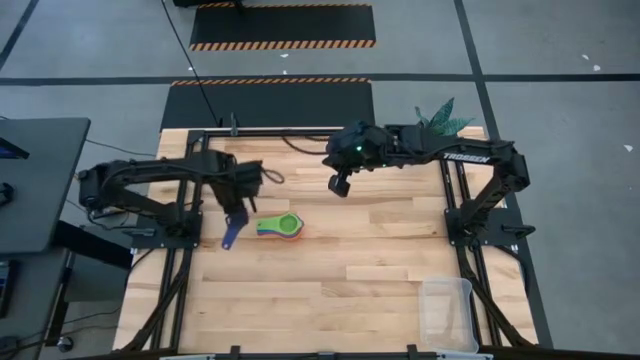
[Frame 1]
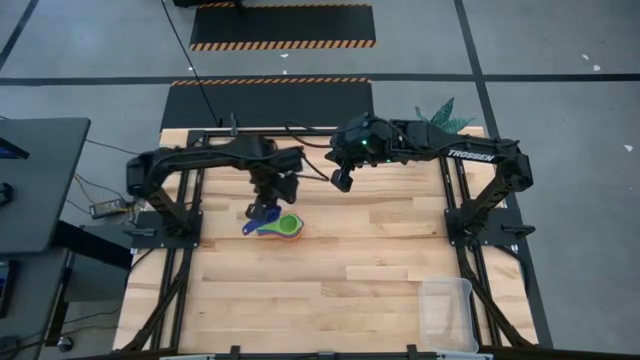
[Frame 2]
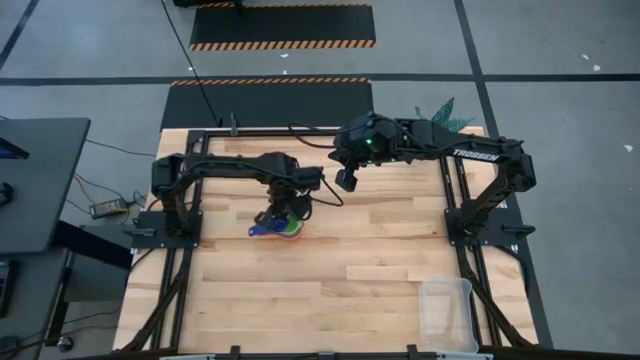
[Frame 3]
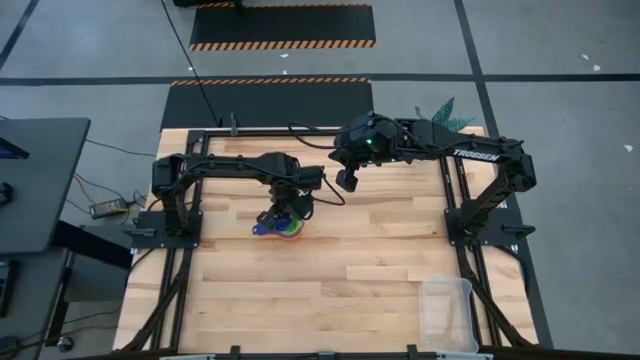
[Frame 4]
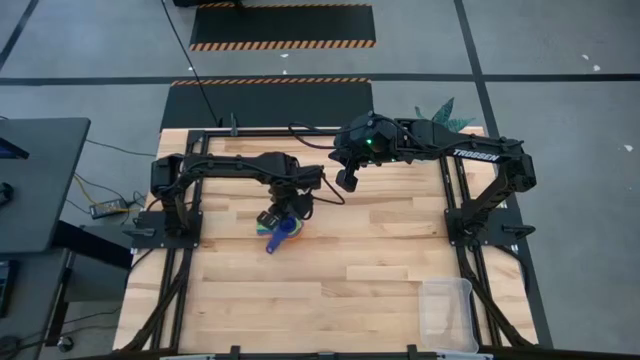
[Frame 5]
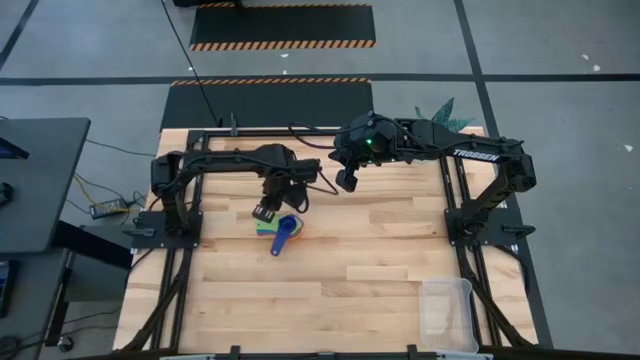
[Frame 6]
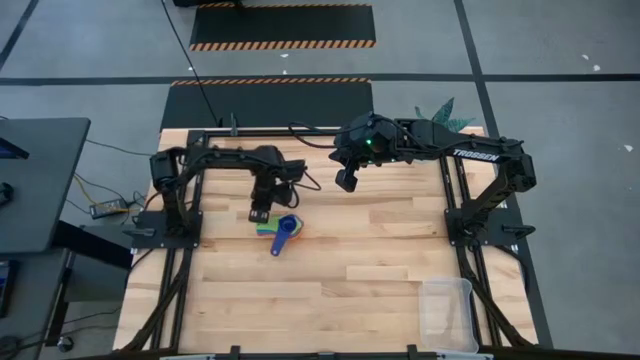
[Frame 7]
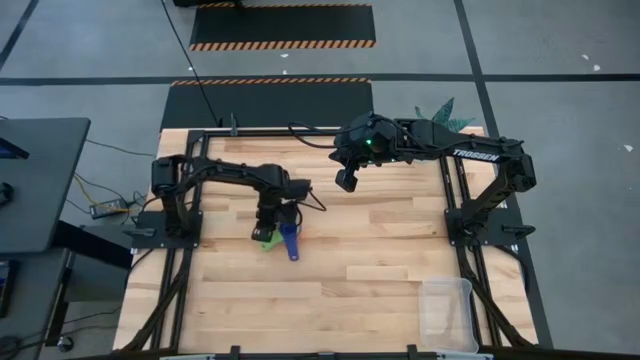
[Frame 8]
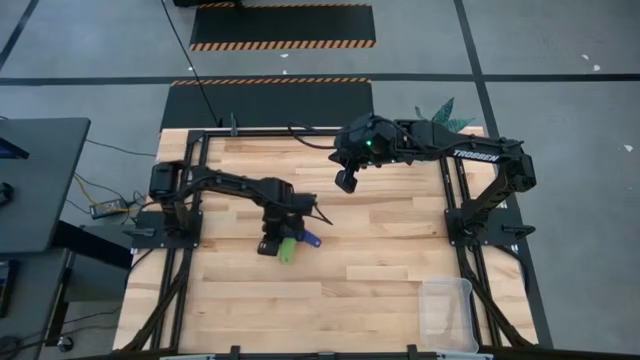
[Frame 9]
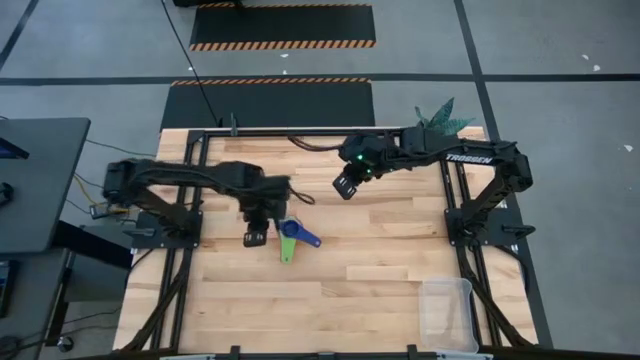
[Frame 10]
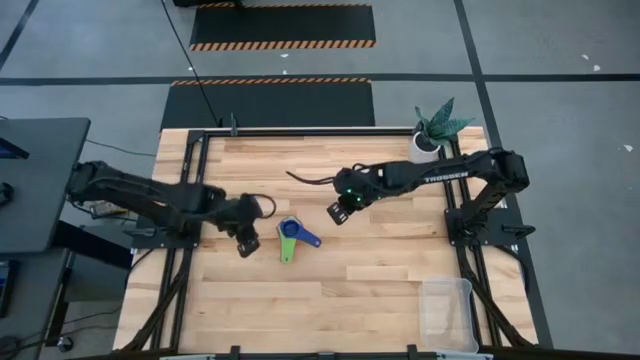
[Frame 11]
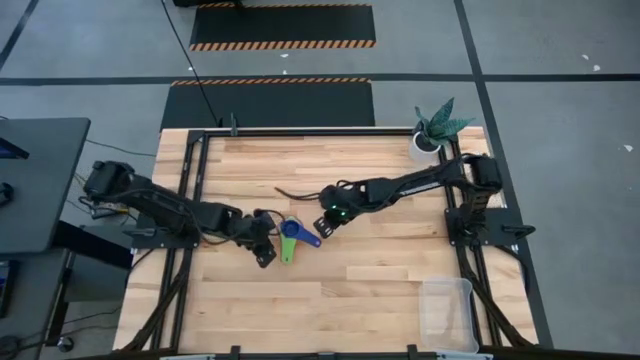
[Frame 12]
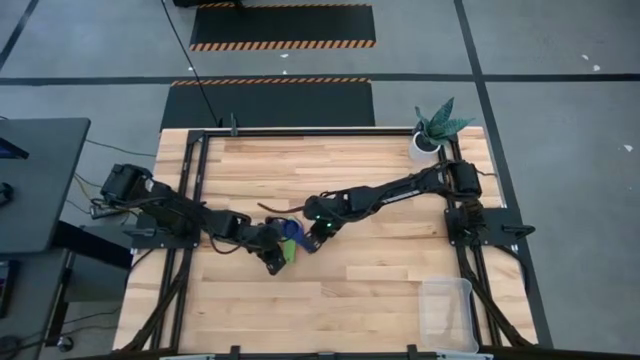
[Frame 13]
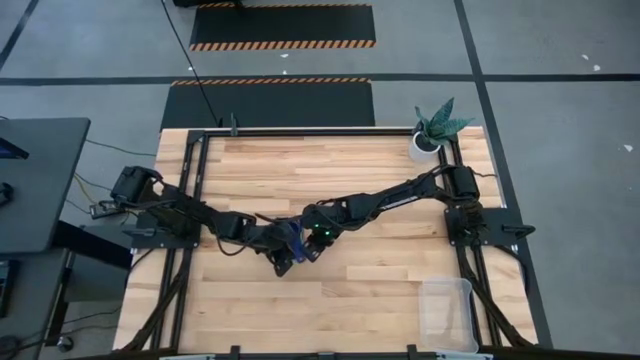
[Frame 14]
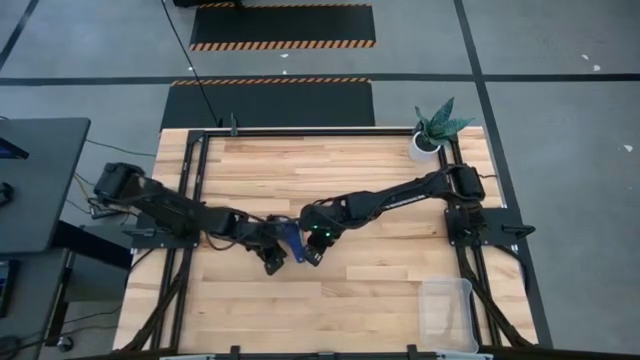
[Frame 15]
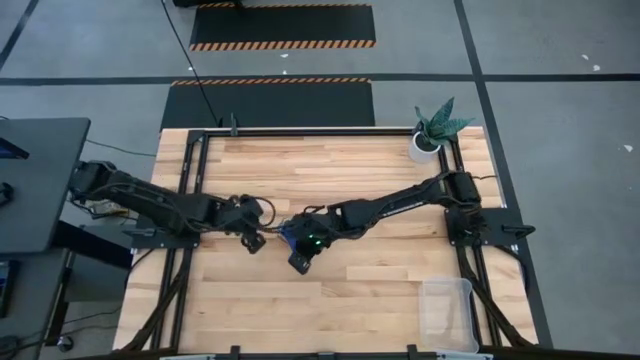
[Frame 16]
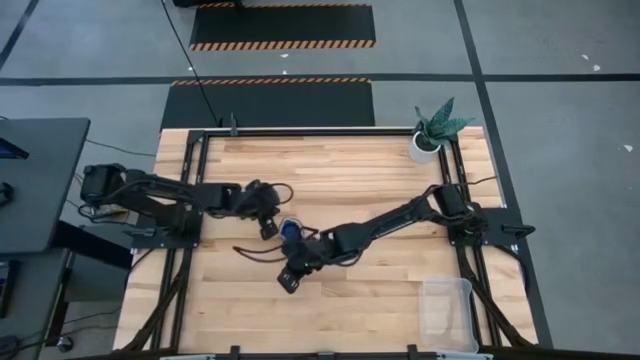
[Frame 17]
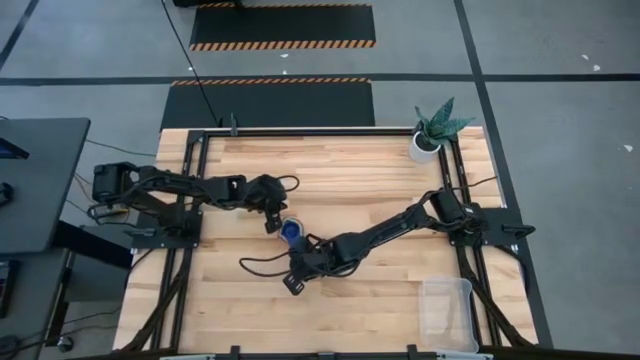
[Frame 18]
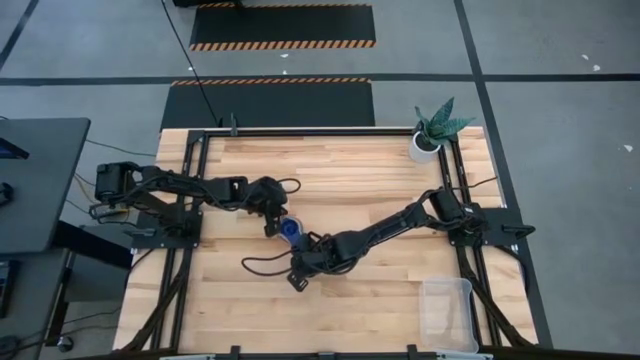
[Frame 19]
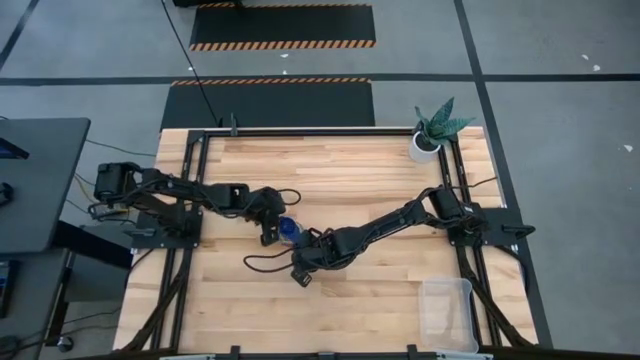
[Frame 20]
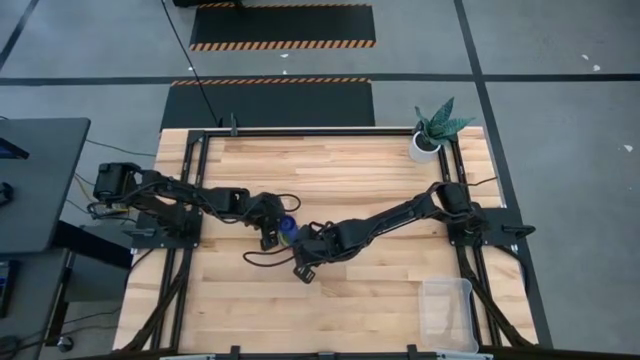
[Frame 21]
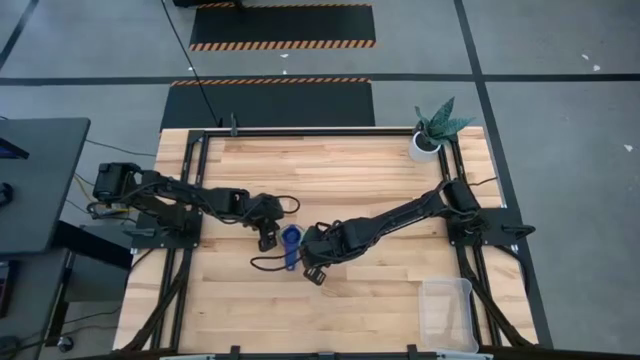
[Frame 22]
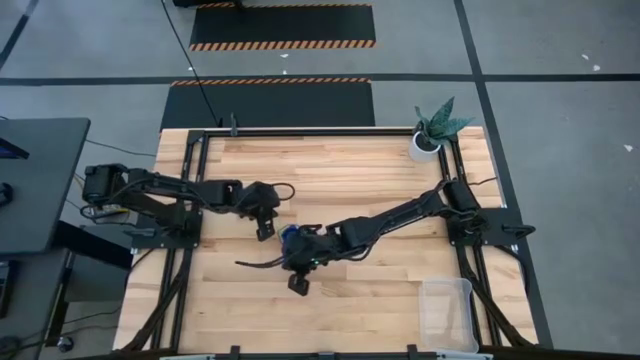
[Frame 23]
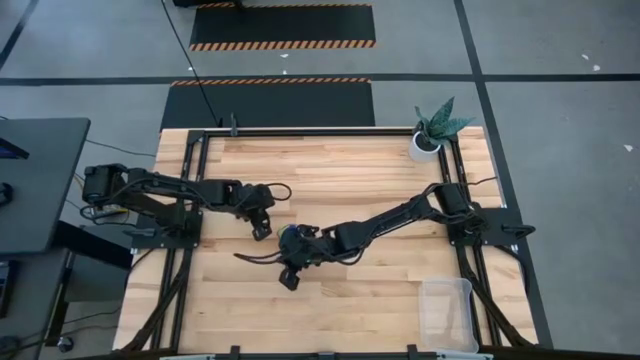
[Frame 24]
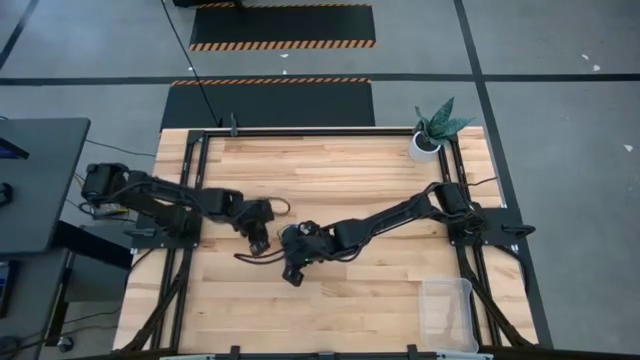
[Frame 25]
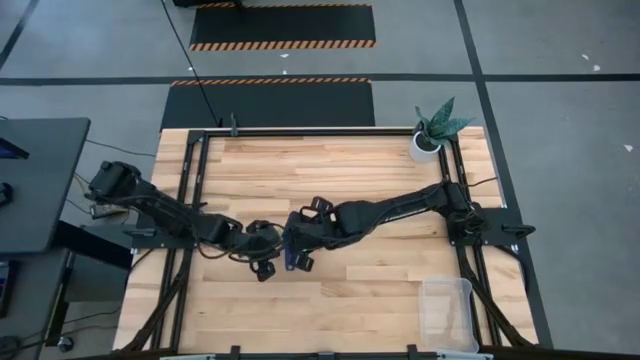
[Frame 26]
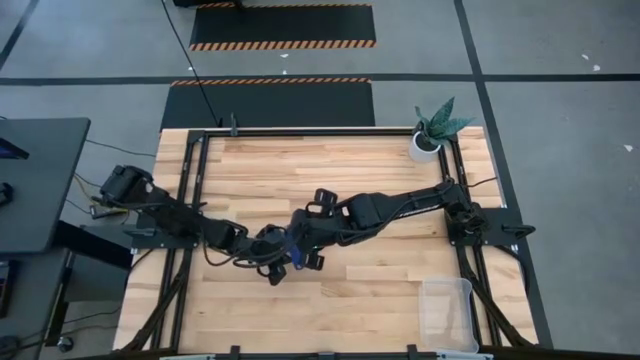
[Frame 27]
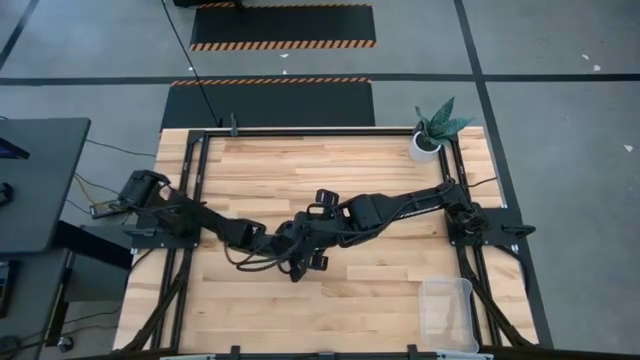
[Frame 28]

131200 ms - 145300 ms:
Task: Nest measuring cups in basket
Stack the dark blue measuring cup on top of the green measuring cup

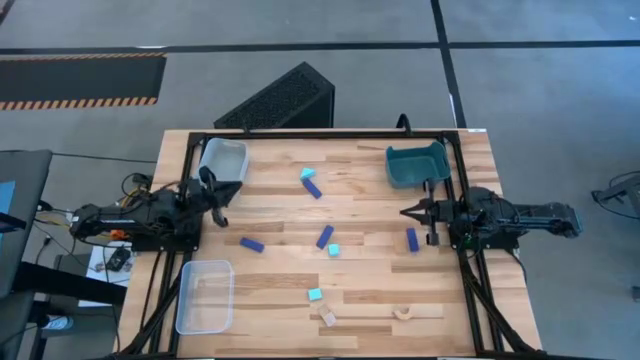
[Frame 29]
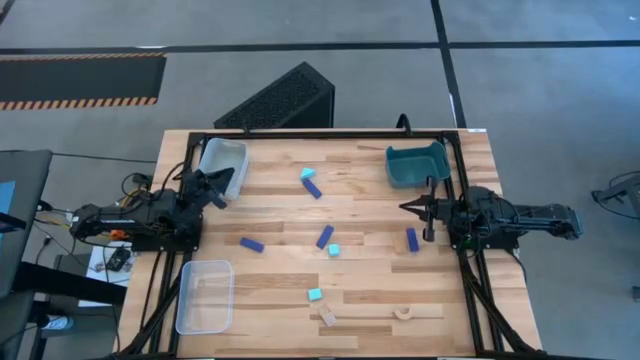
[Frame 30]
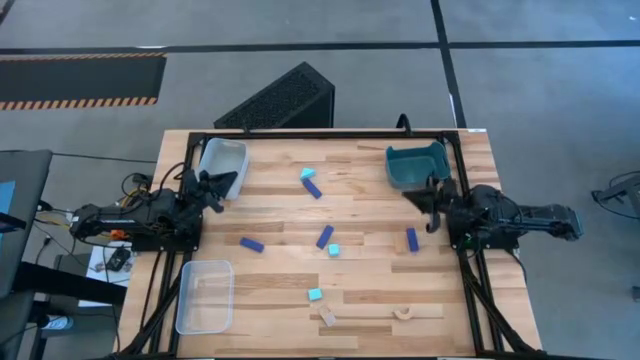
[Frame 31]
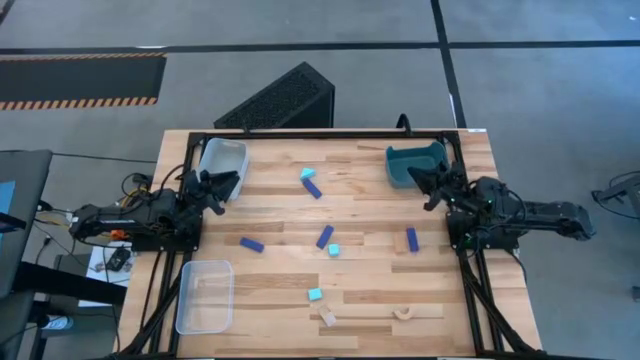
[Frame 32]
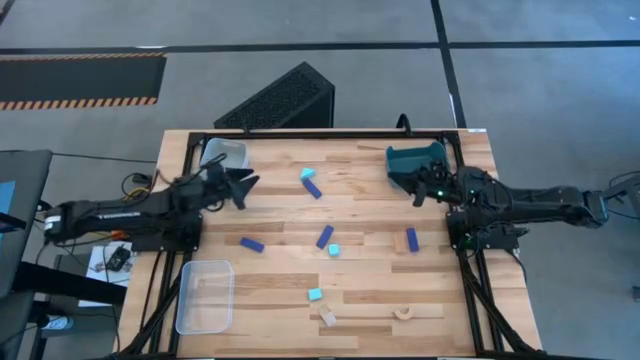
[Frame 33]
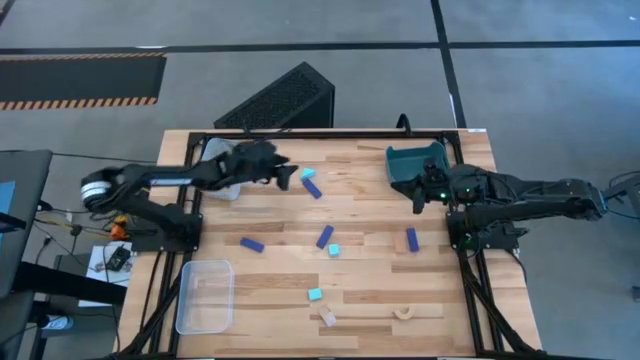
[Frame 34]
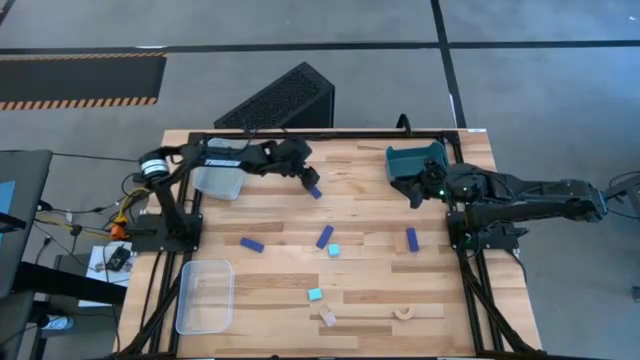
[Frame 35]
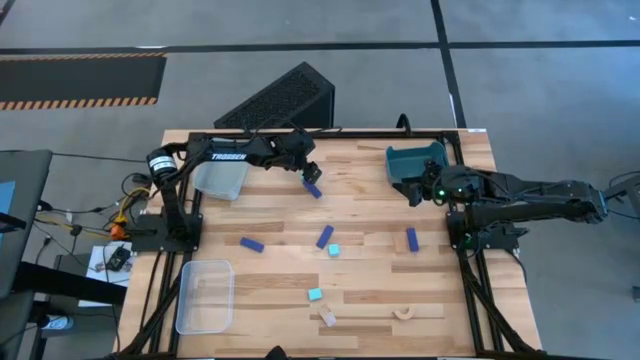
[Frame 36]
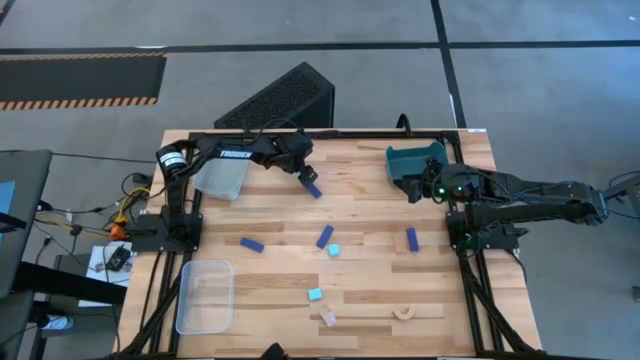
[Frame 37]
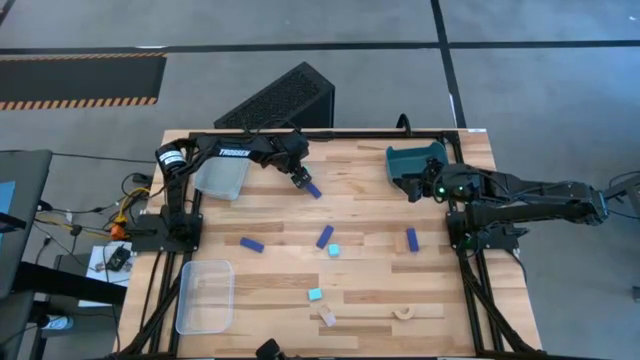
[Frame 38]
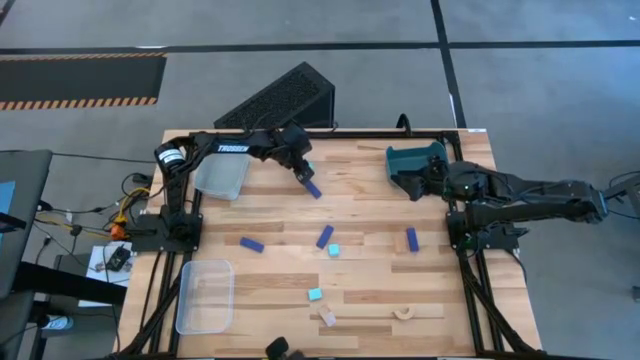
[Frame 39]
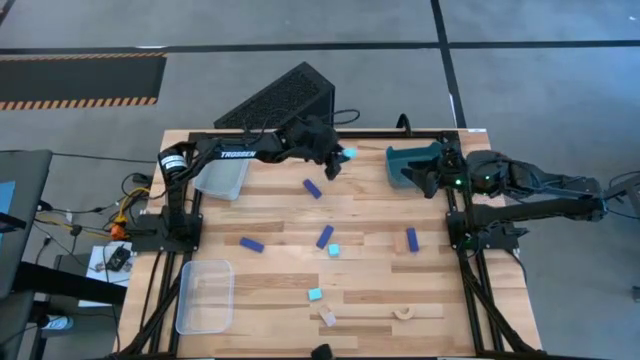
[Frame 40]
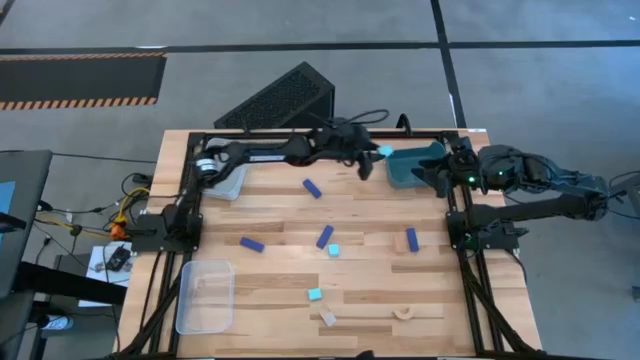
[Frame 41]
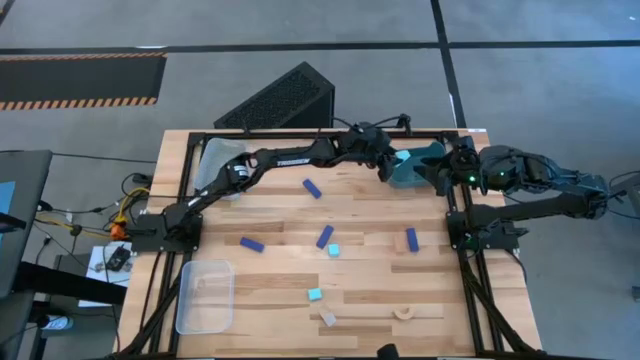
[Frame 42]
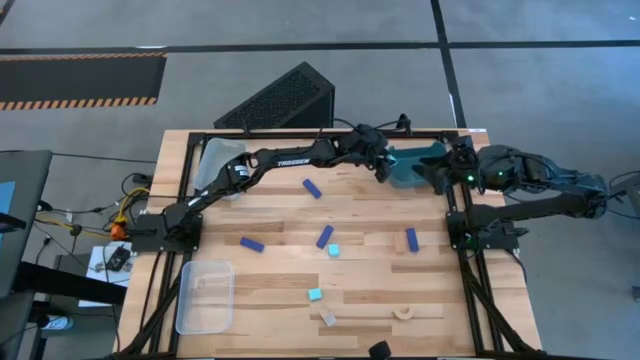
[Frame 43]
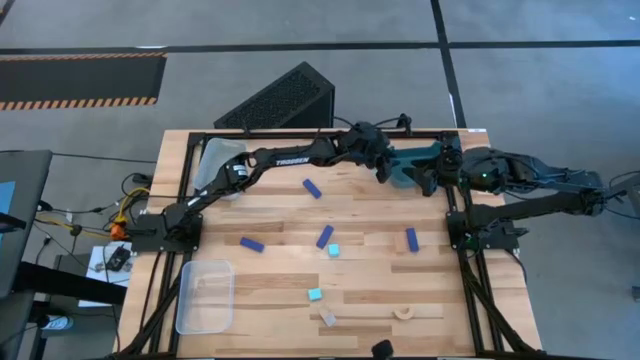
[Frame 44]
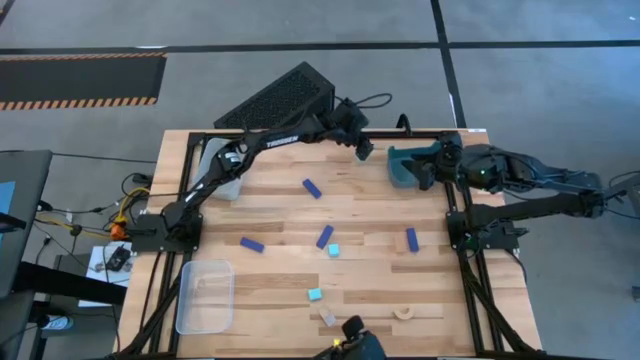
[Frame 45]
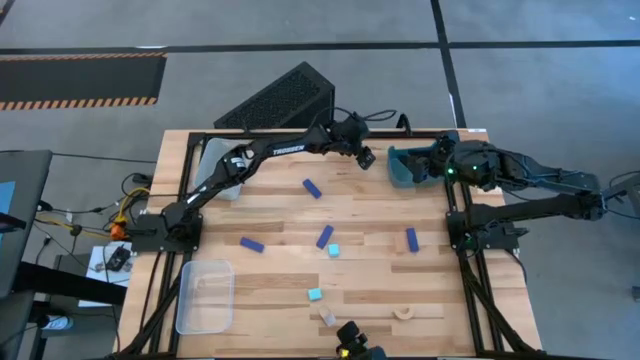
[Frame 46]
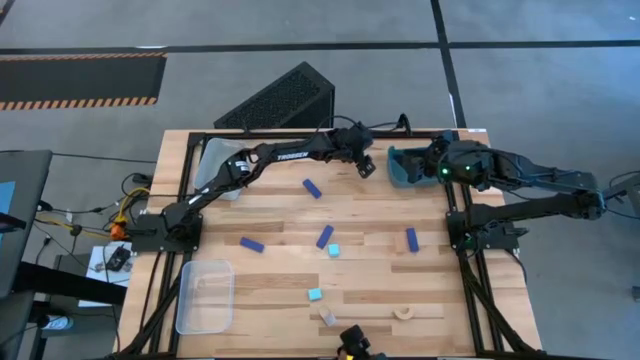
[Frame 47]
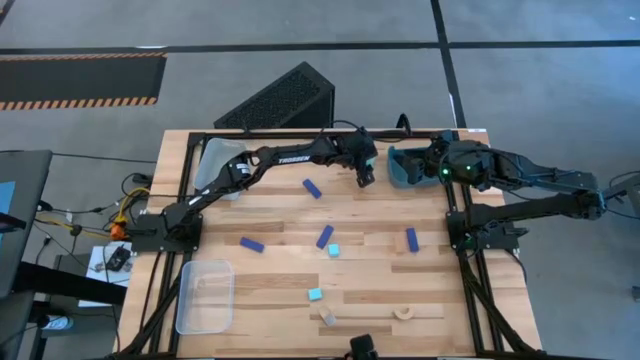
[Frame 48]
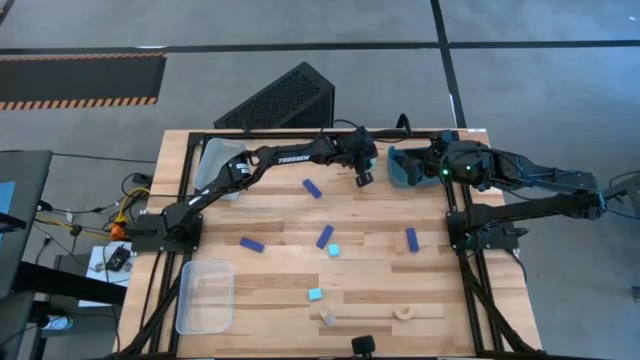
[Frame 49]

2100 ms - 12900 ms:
Task: Sort & place blocks by color
Put the light blue block into the dark green bin
